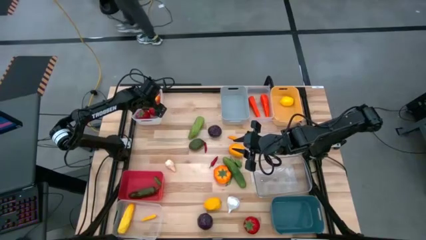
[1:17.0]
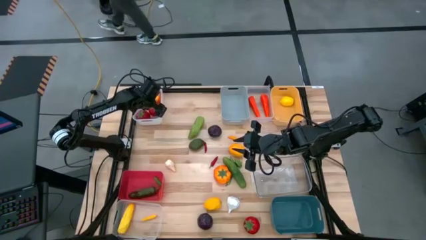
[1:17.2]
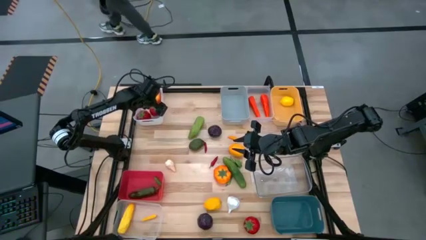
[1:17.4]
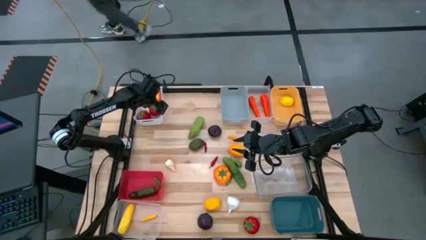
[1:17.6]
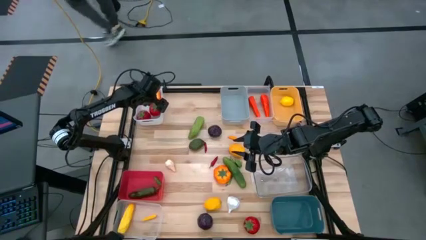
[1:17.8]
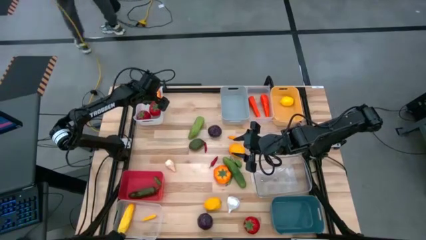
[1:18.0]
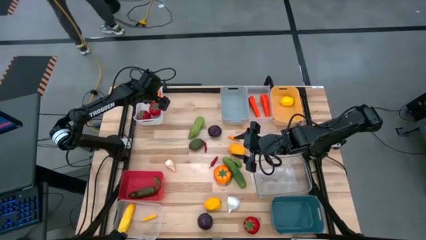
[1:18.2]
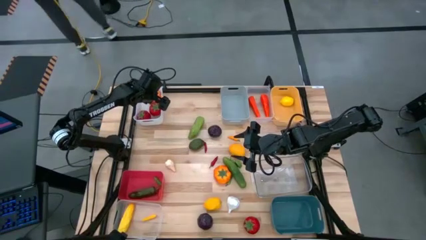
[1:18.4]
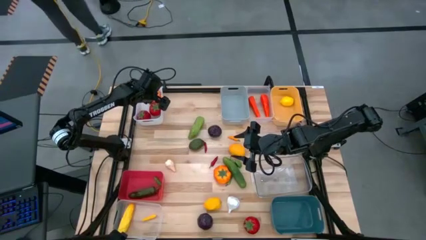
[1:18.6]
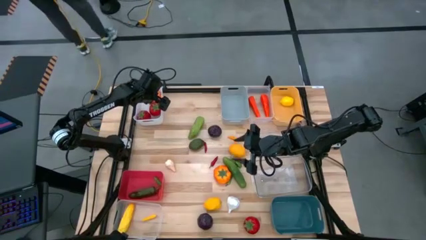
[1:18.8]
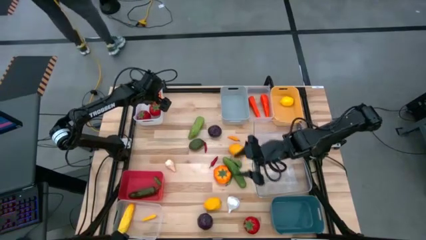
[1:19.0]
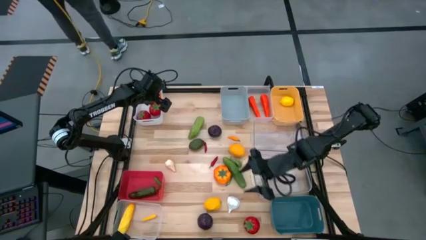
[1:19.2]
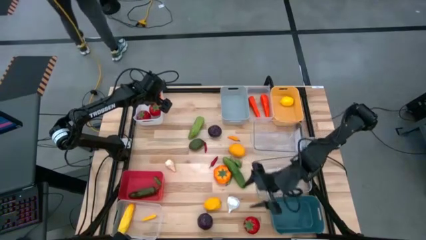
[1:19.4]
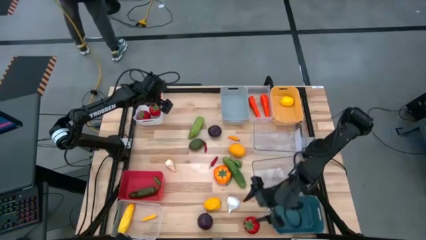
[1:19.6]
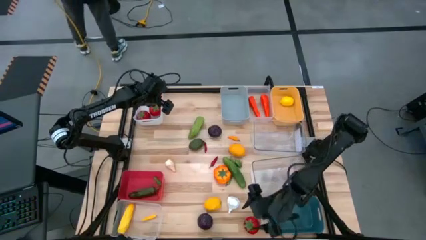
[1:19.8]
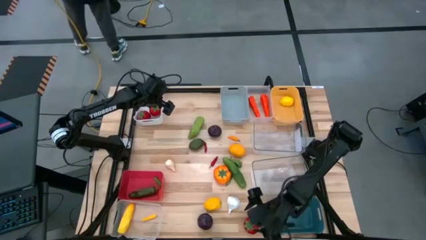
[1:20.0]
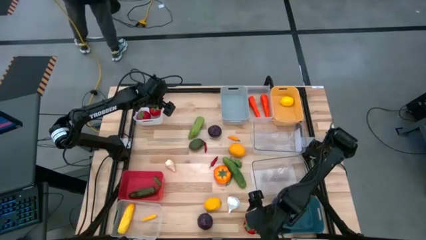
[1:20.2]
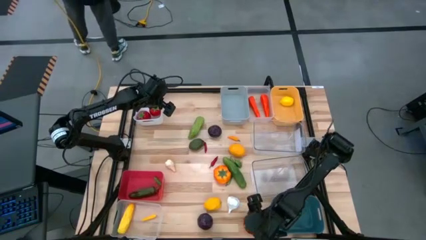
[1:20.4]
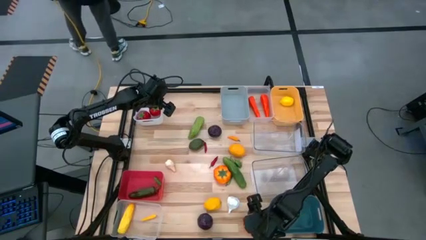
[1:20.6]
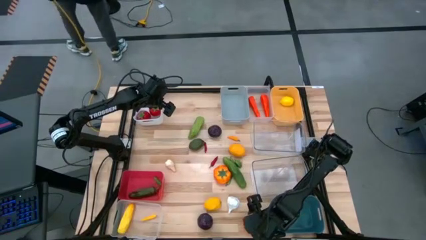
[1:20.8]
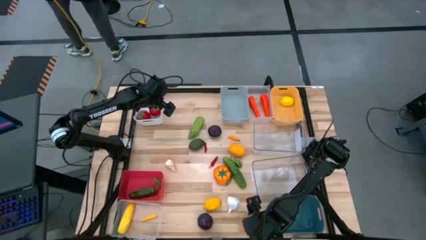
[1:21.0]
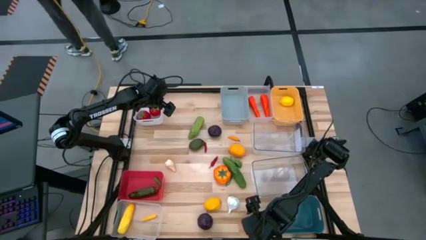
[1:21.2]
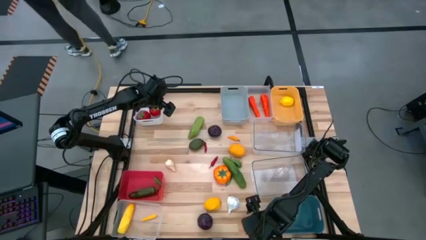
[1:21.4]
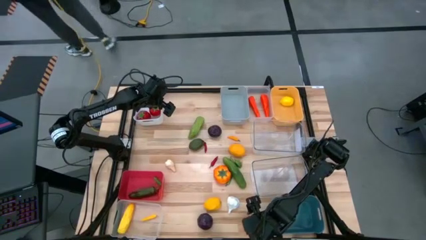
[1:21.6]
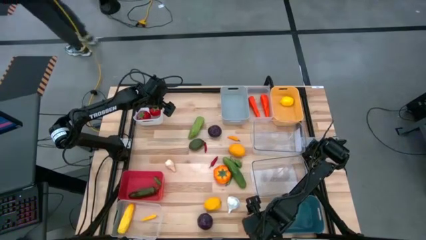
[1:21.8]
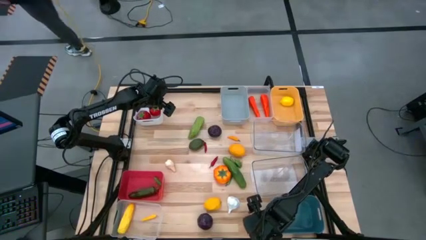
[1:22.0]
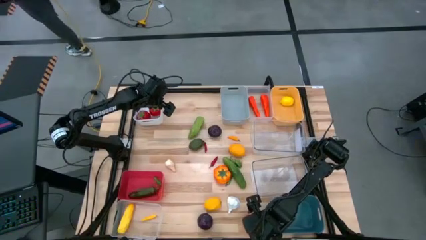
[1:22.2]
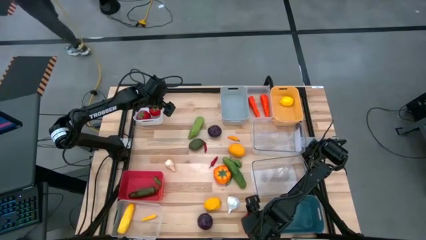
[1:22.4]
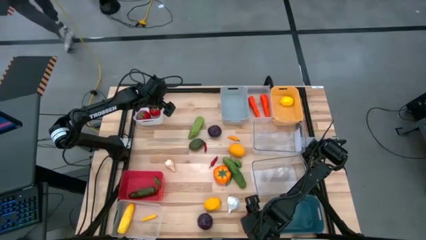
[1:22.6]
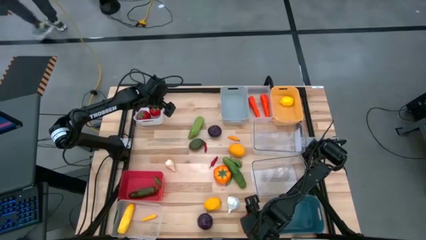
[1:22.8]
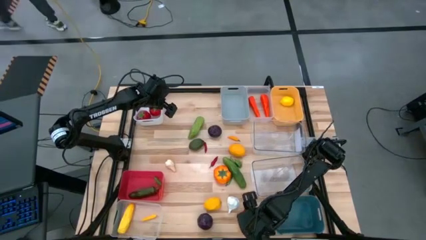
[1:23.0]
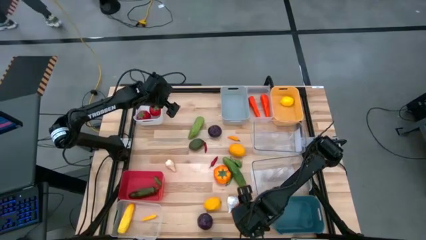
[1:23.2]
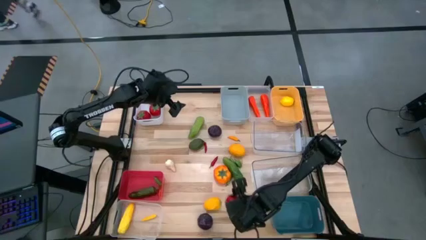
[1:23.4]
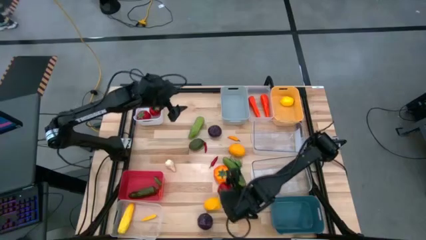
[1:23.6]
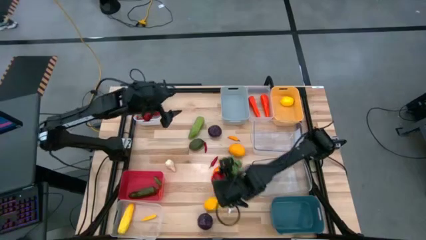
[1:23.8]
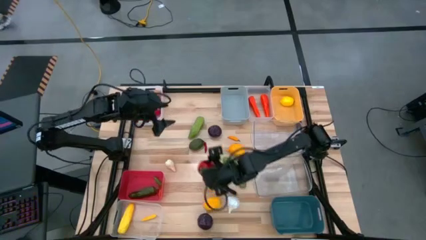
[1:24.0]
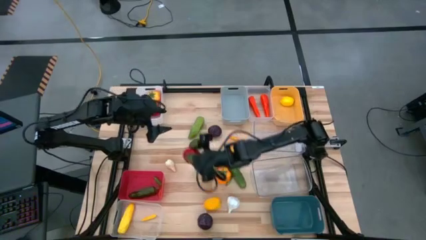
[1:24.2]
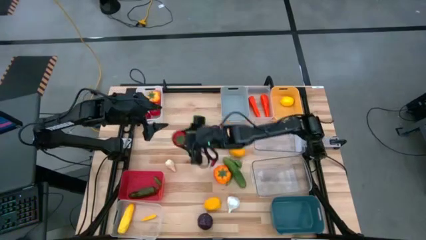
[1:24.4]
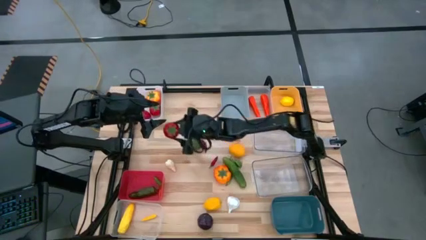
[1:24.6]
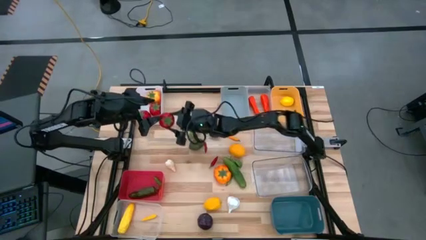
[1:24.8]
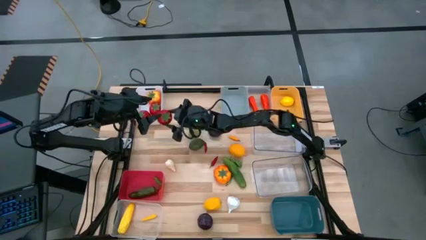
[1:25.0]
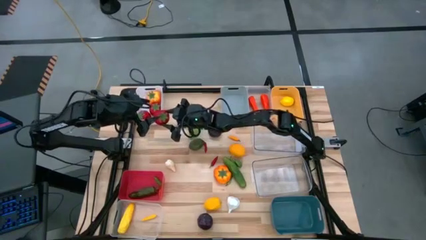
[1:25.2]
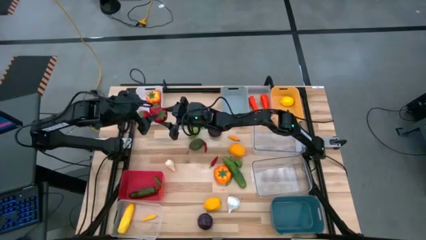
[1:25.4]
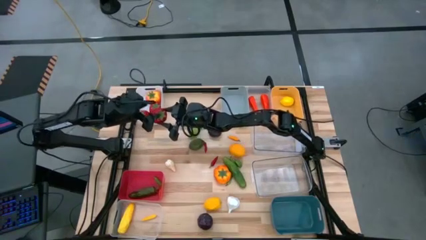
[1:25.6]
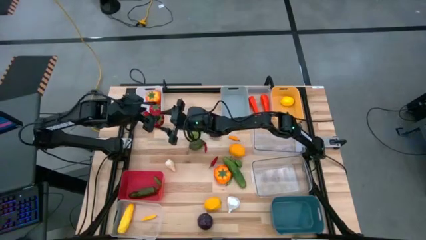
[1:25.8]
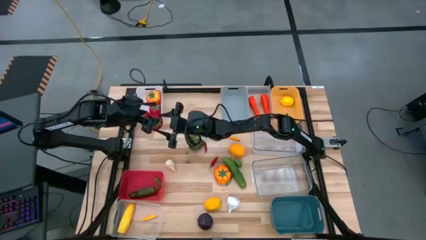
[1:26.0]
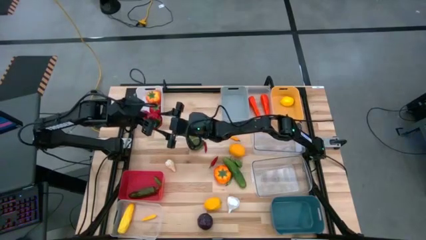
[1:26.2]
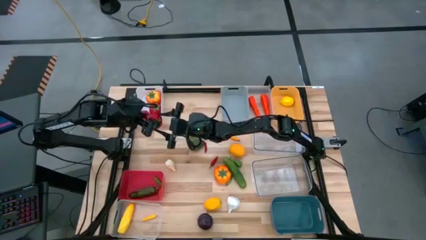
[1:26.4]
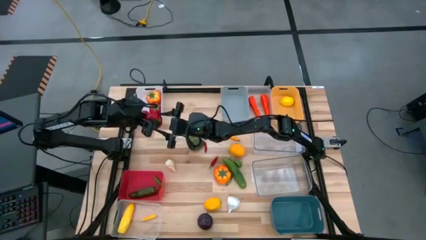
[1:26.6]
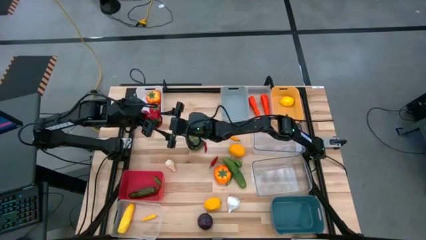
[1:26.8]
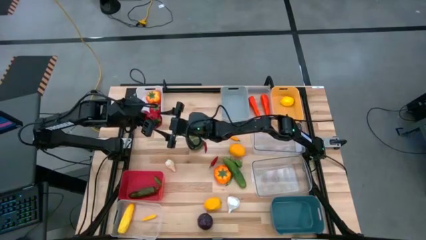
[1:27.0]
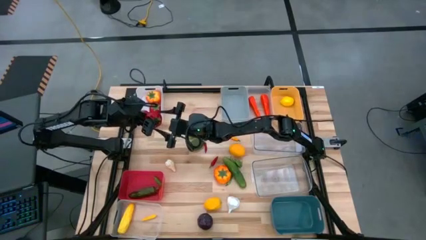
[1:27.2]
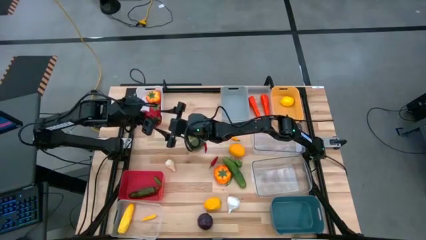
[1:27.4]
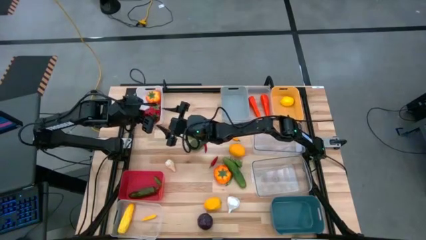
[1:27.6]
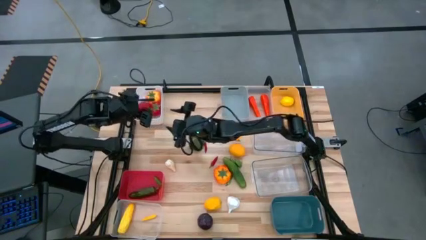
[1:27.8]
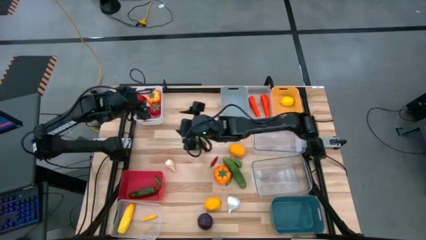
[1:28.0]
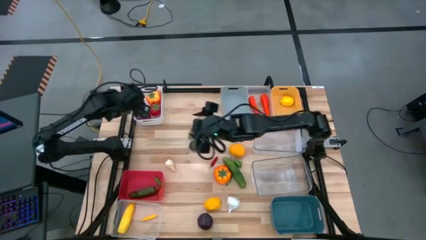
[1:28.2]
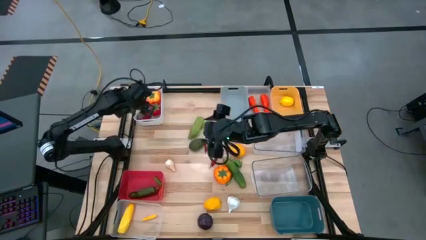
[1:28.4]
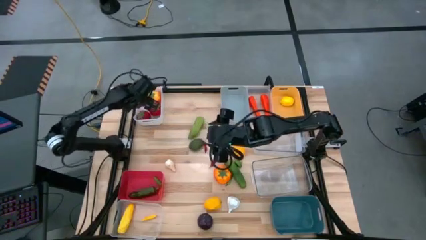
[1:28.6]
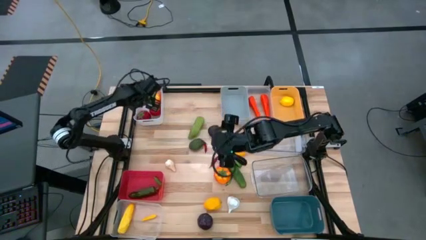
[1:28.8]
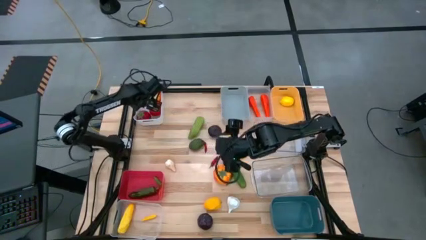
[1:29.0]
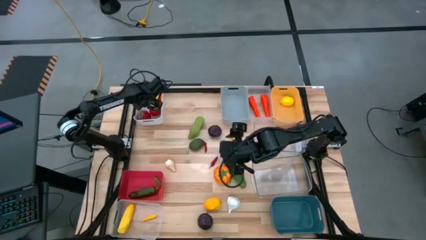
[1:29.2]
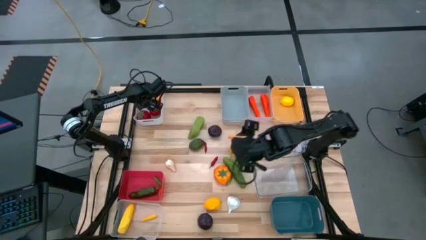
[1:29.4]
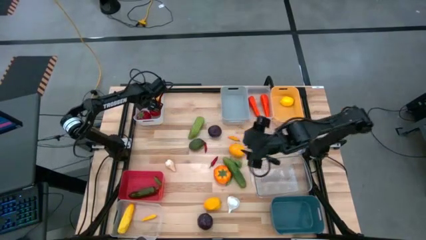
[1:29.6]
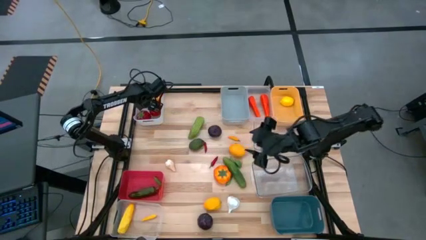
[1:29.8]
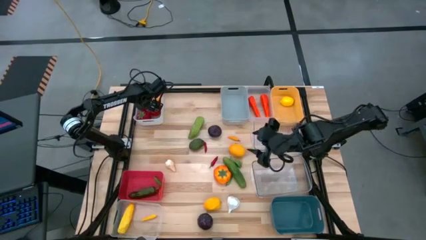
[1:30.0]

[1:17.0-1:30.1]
Task: Sort produce into baskets
Put the red tomato into the white bin

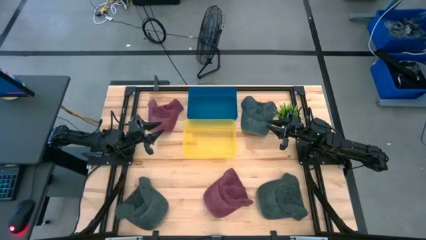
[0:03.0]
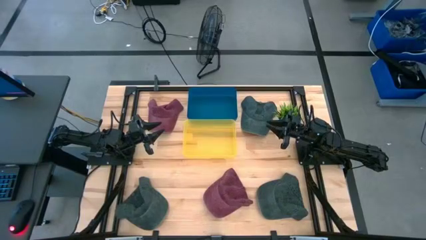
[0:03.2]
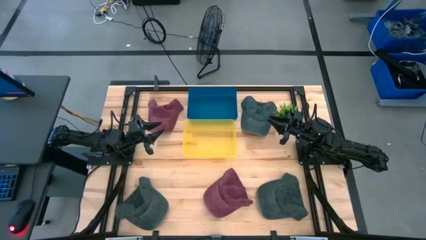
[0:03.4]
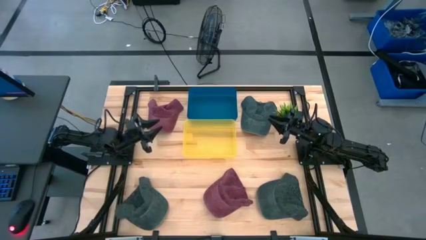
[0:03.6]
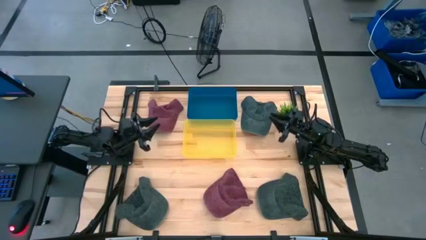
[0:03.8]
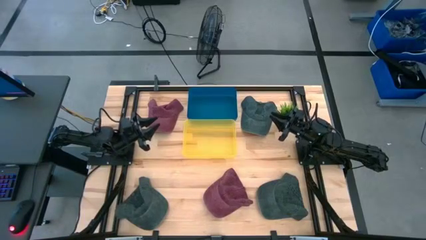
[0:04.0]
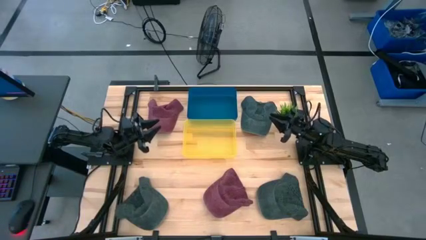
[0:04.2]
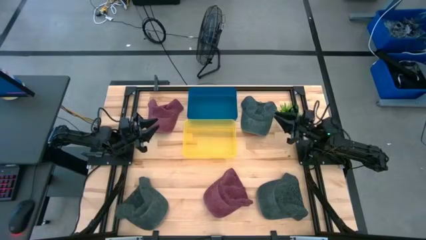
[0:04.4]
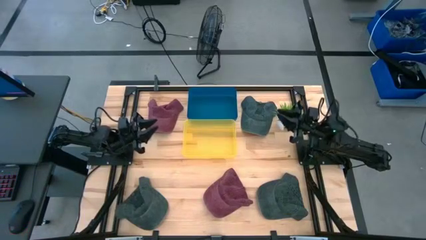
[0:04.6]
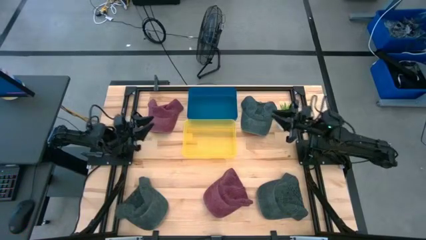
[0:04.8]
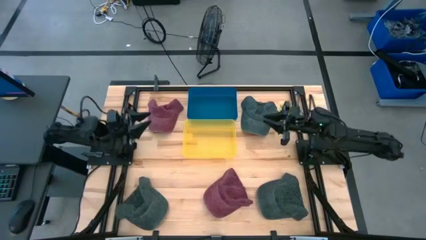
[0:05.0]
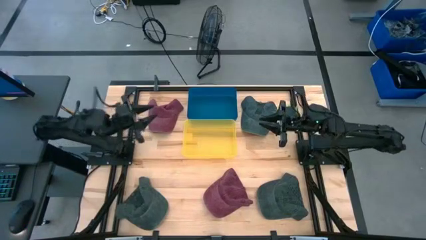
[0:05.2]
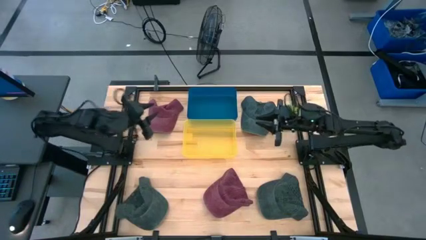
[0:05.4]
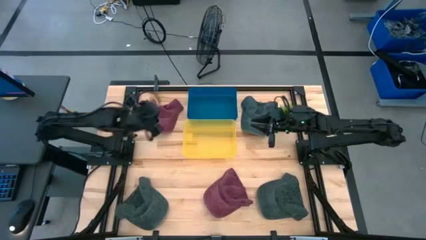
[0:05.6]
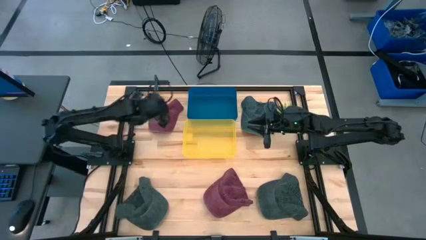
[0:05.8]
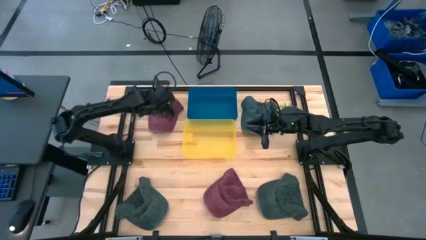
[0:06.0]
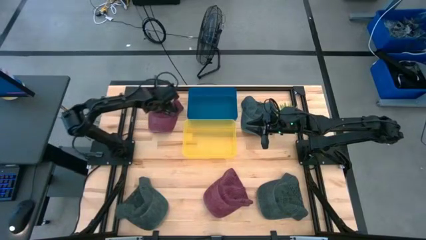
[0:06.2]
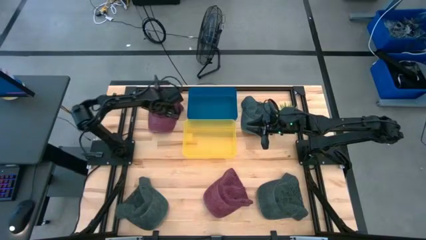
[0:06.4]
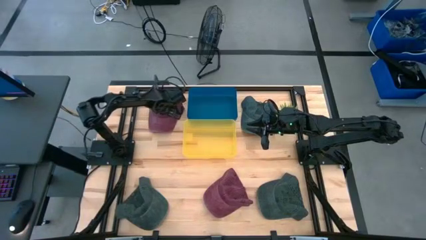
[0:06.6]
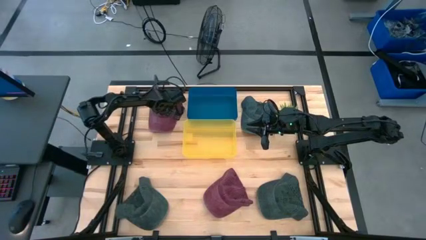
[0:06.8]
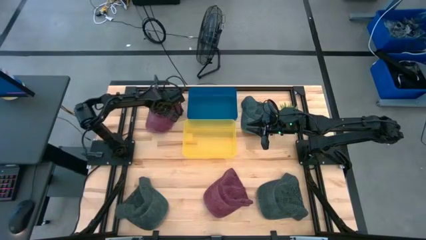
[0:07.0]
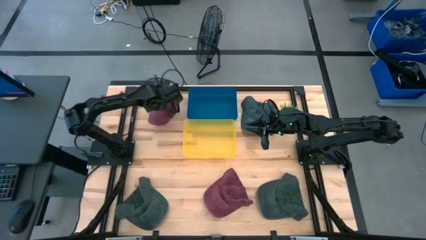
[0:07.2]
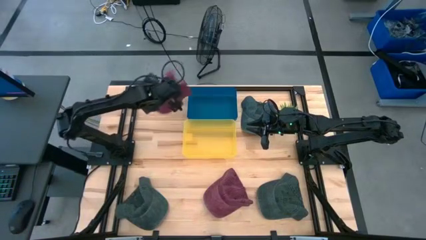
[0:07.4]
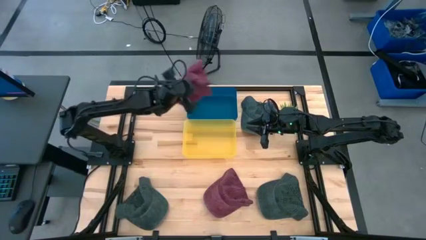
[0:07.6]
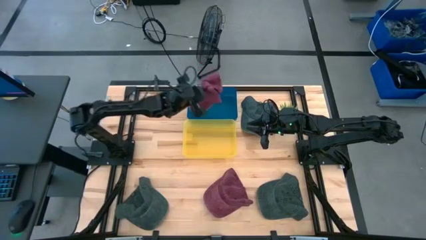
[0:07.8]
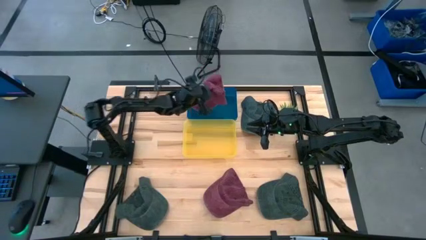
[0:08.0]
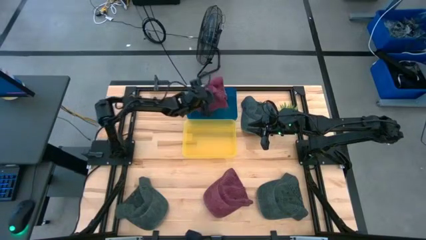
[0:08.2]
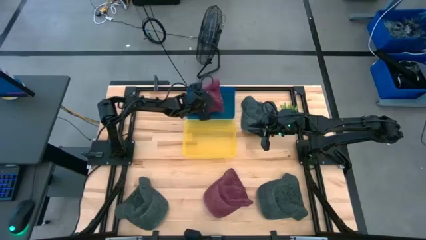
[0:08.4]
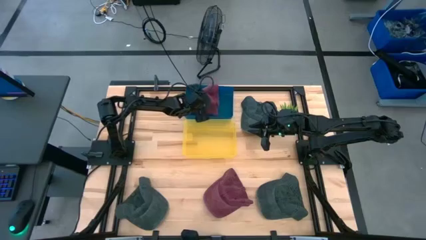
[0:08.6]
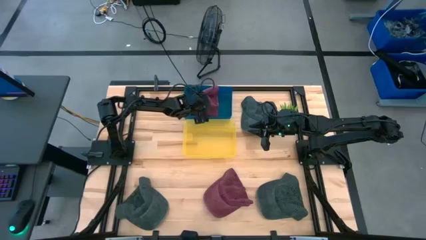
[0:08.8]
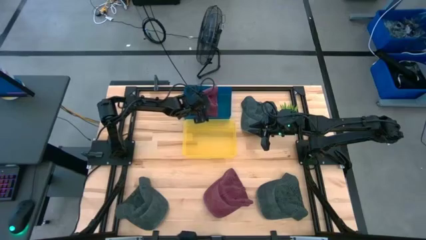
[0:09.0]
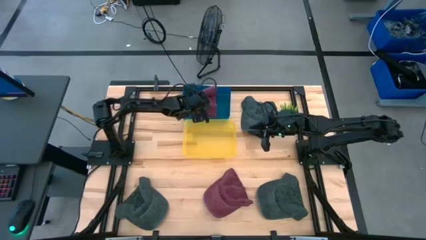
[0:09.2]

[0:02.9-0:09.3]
Task: Pick & Place hat
Put the top red cap into the blue bin
